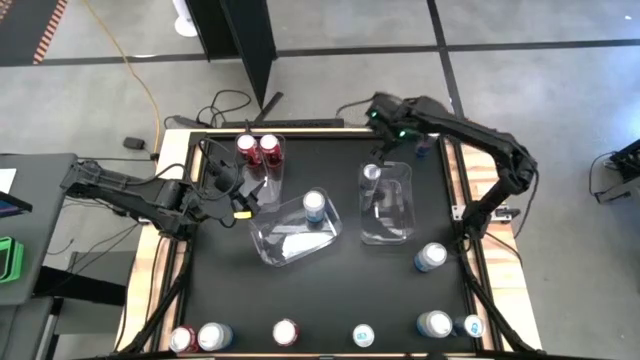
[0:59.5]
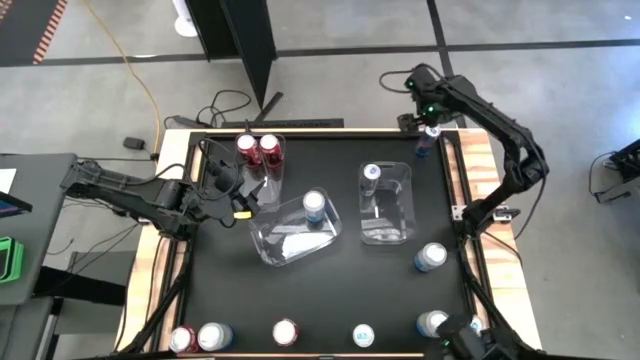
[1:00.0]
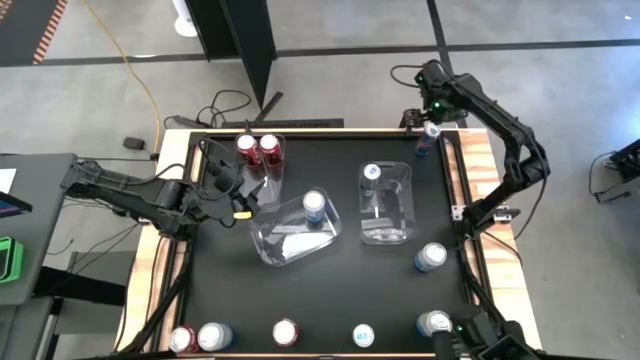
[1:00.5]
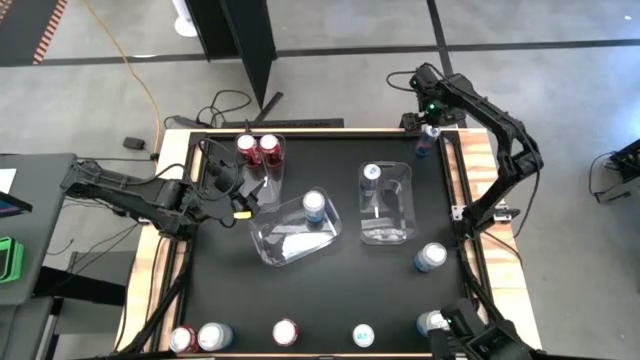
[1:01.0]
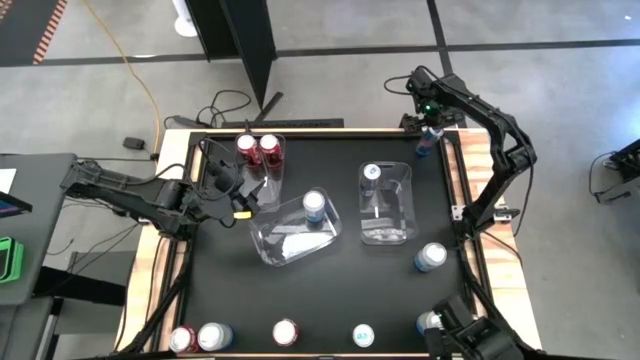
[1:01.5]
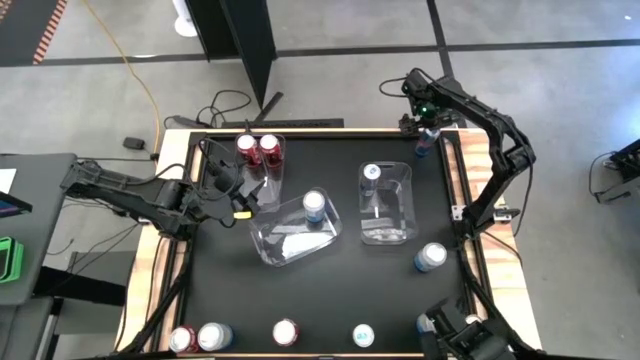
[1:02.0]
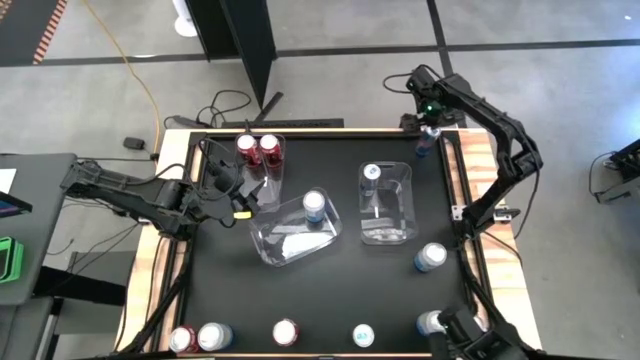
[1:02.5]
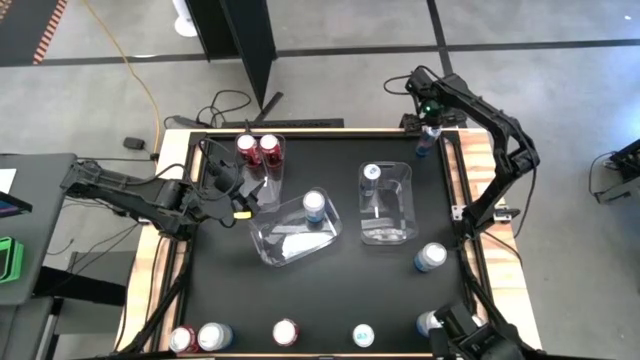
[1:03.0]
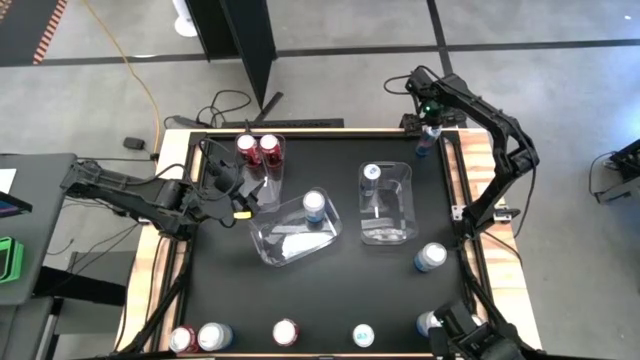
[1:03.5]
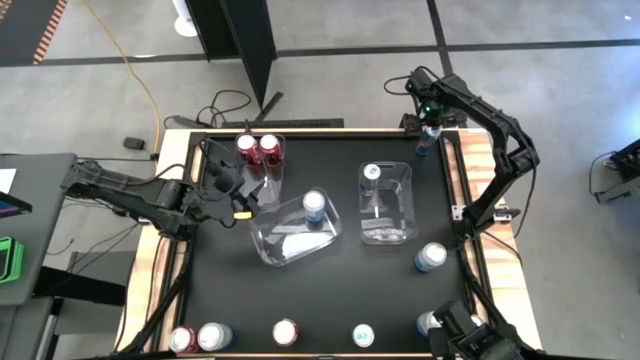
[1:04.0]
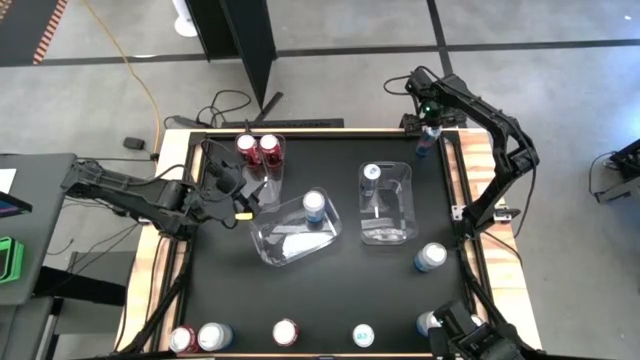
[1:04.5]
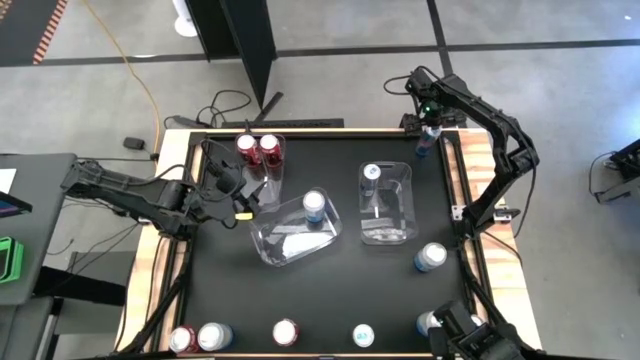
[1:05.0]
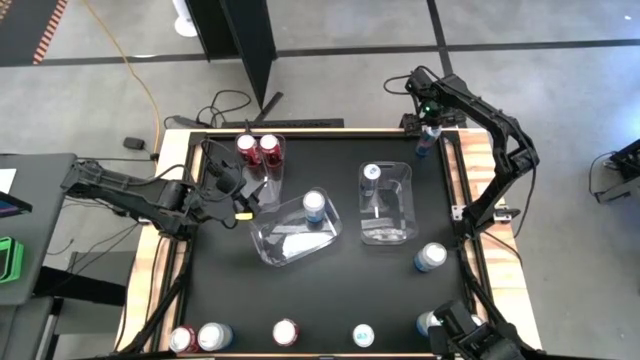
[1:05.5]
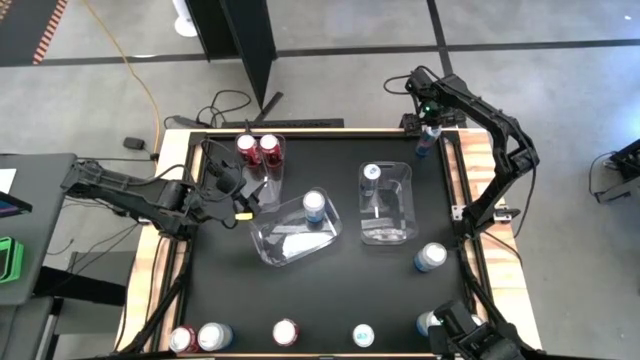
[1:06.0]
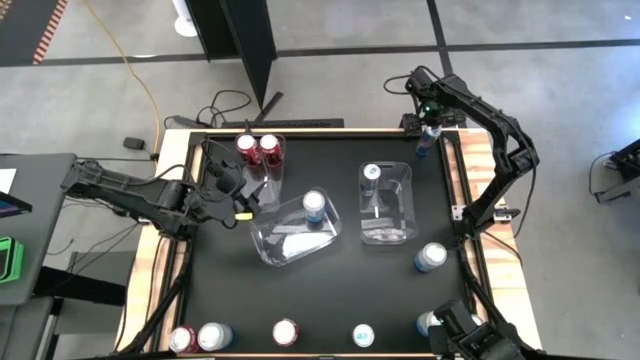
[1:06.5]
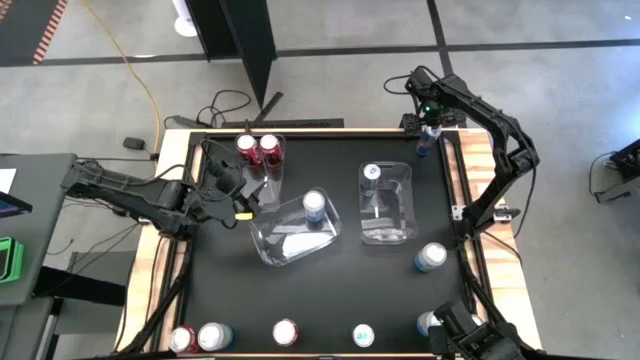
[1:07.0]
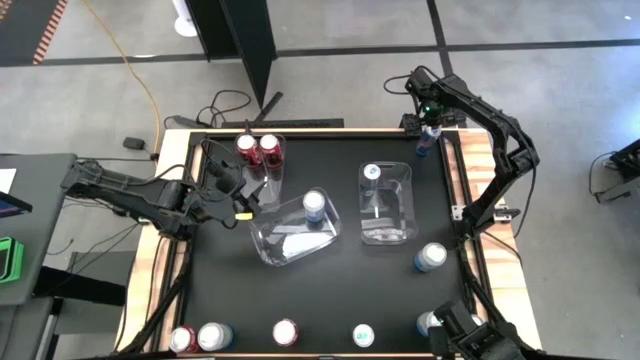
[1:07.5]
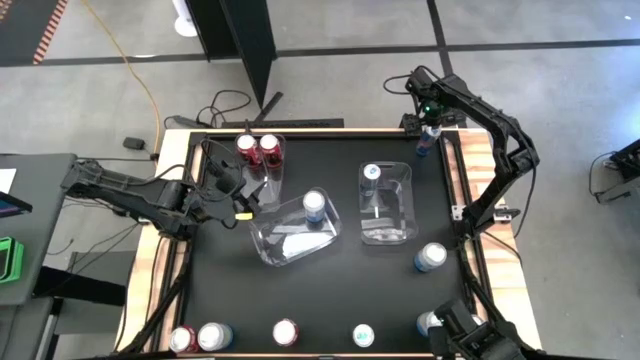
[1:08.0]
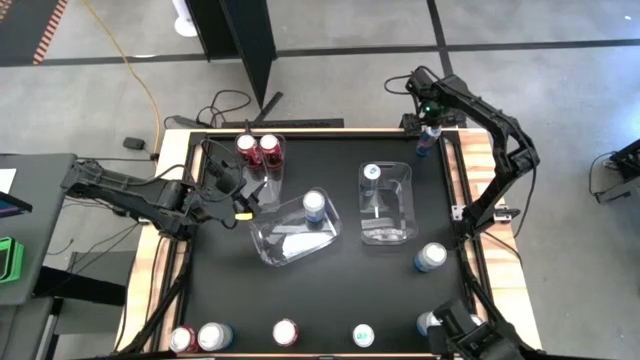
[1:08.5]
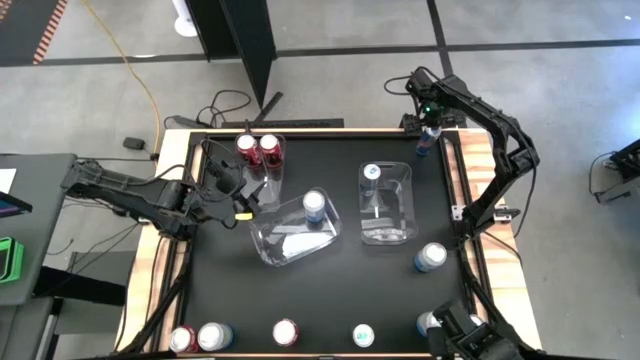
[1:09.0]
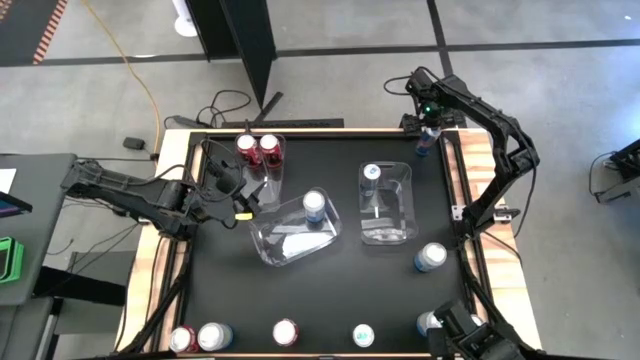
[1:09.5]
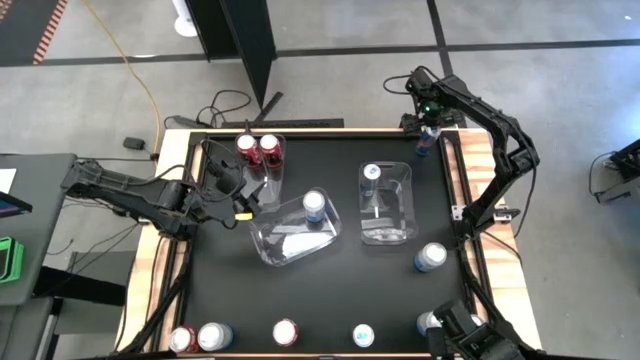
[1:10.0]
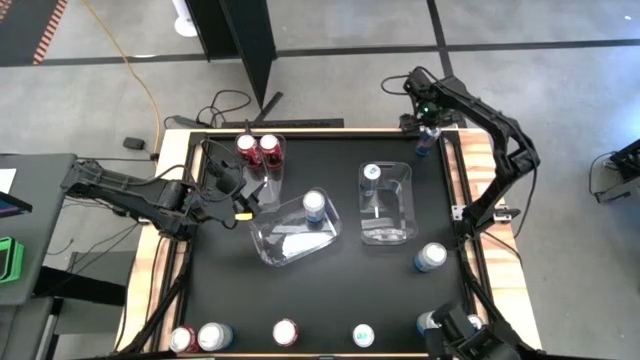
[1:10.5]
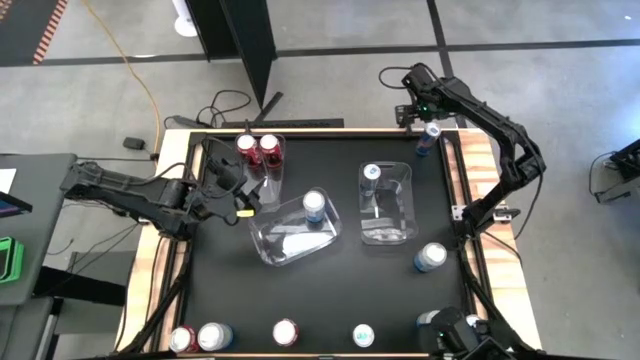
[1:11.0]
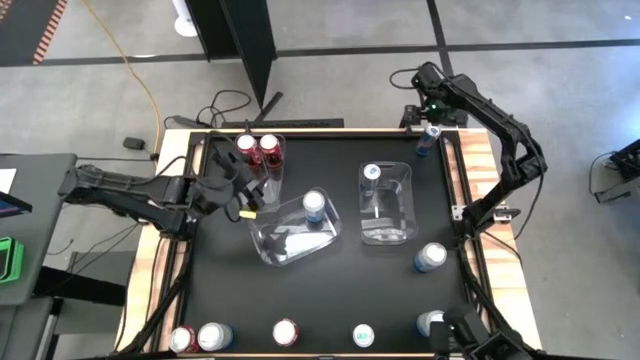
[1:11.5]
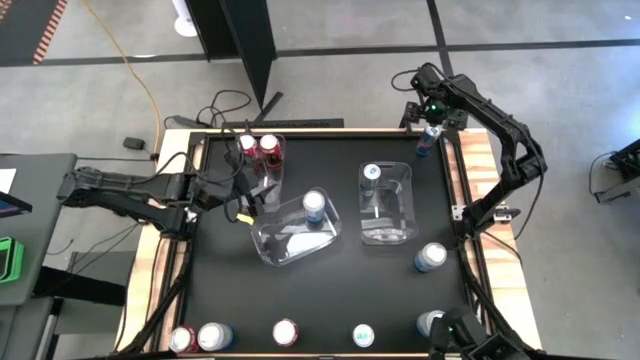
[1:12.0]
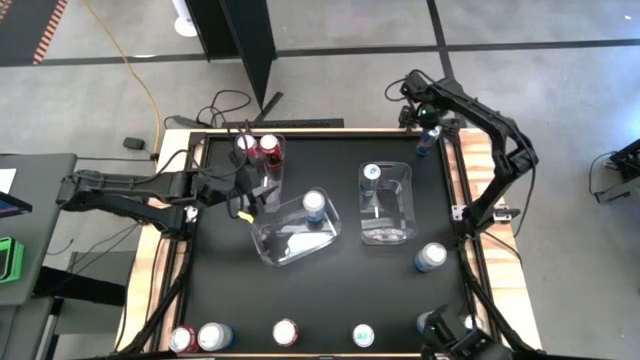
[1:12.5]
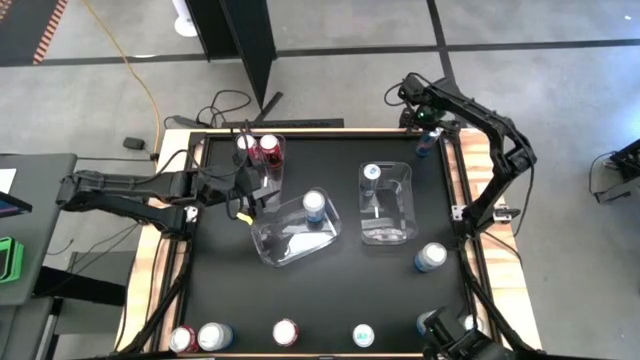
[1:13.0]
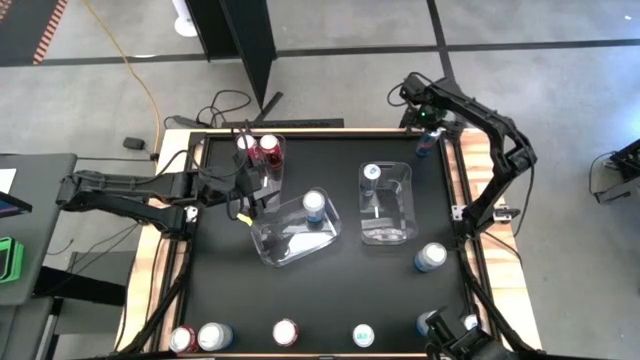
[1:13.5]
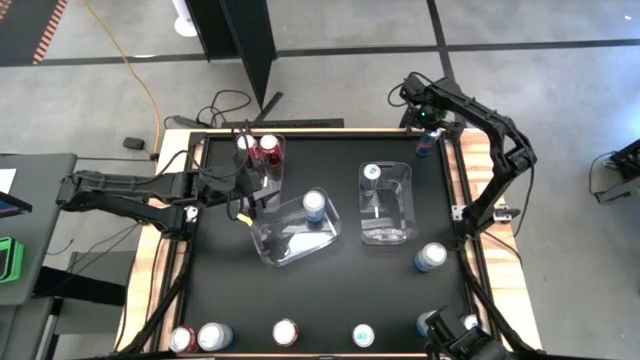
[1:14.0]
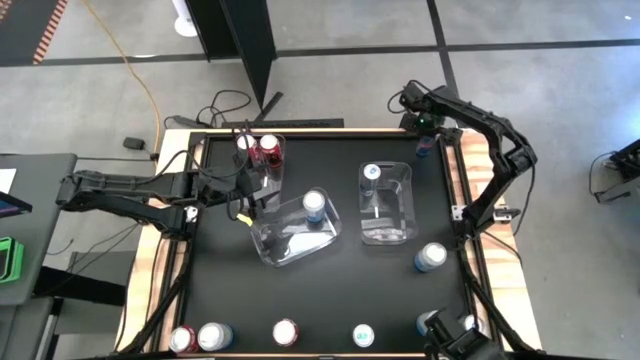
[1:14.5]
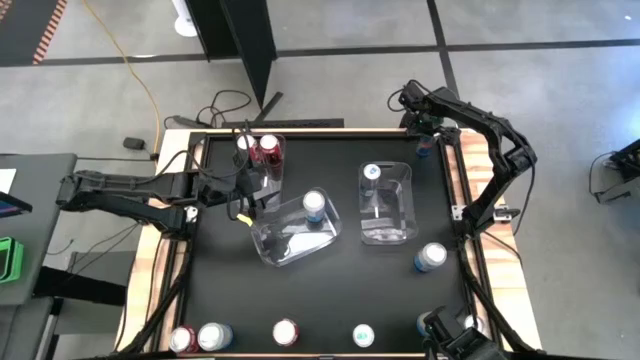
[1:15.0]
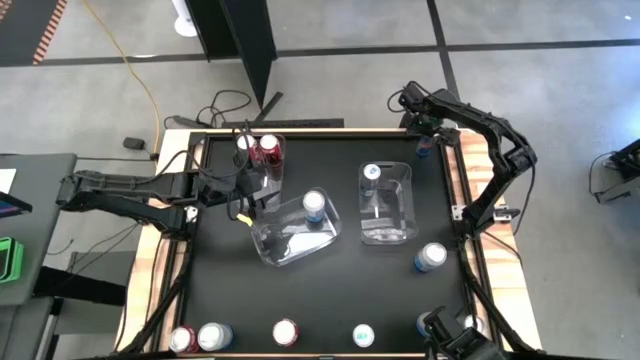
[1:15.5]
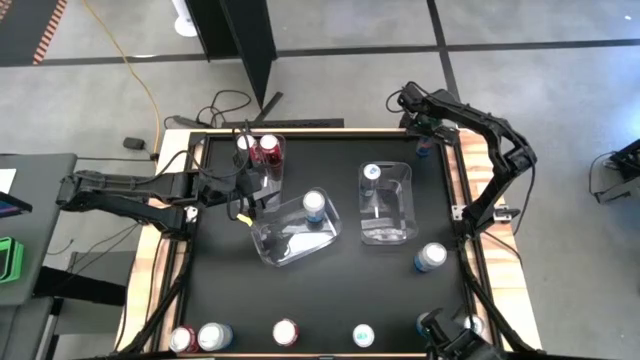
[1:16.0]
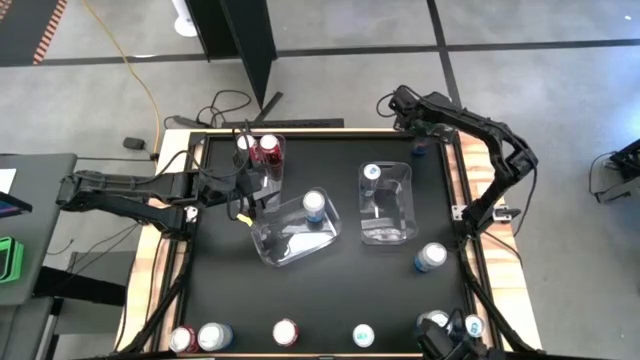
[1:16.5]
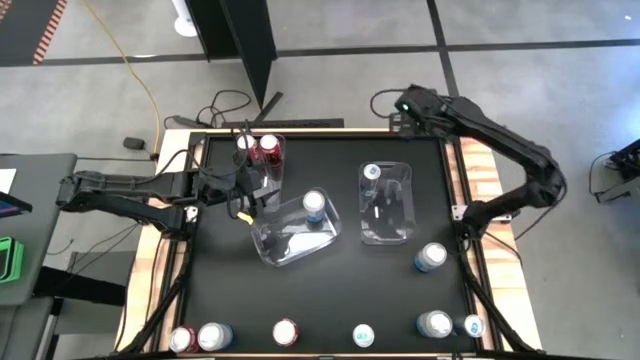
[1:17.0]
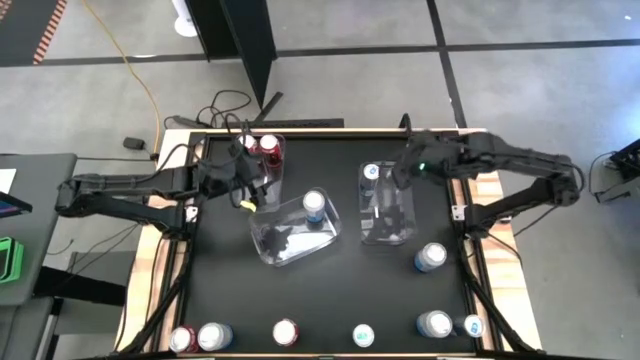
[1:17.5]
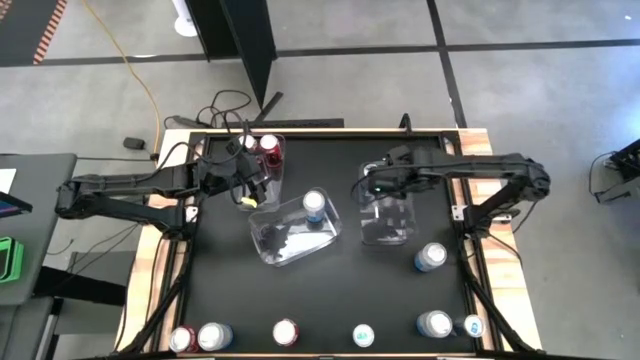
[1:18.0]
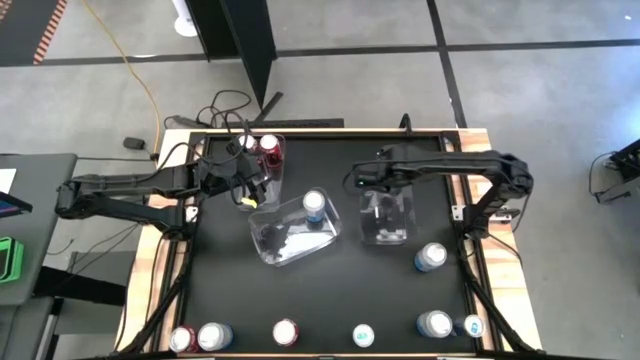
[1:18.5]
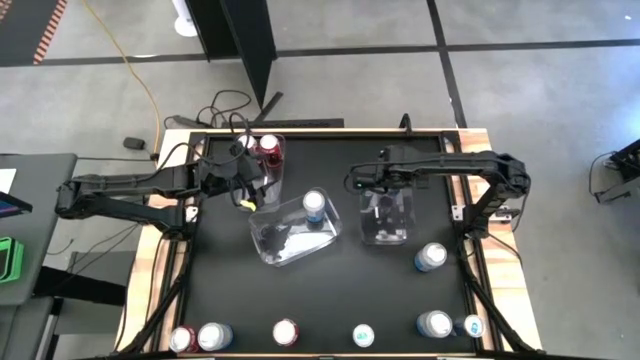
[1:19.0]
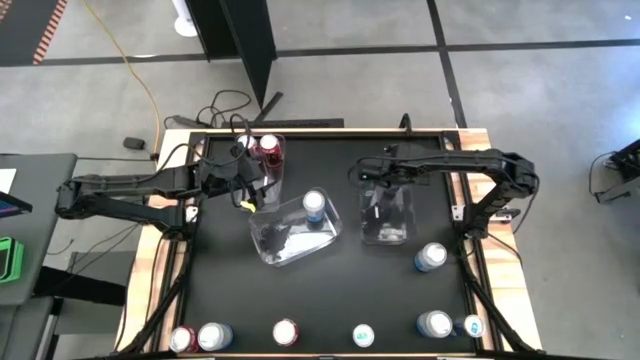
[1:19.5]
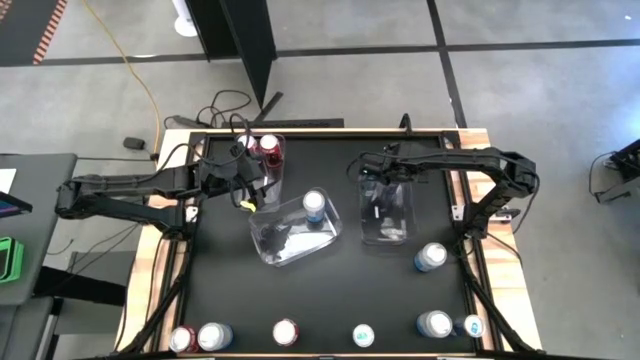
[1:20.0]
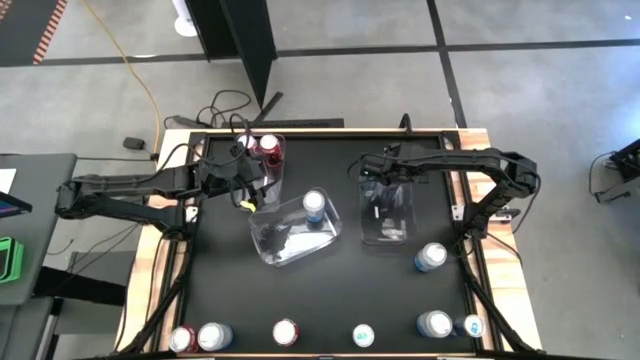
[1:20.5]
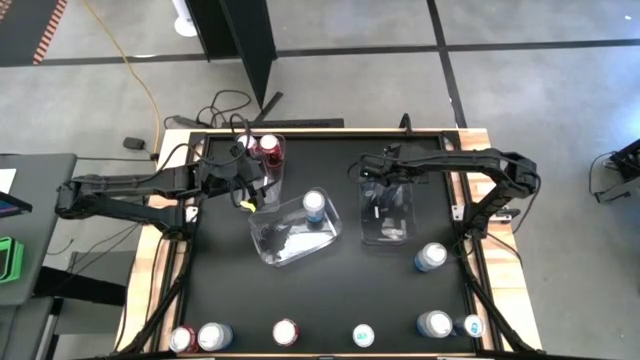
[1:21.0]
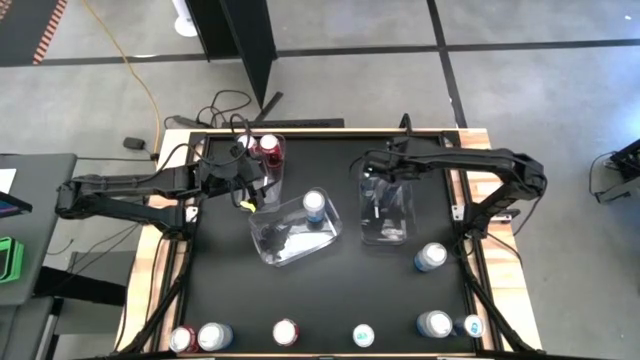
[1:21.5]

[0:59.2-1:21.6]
Task: Sort soda cans
Put the top blue soda can into the right transparent bin
